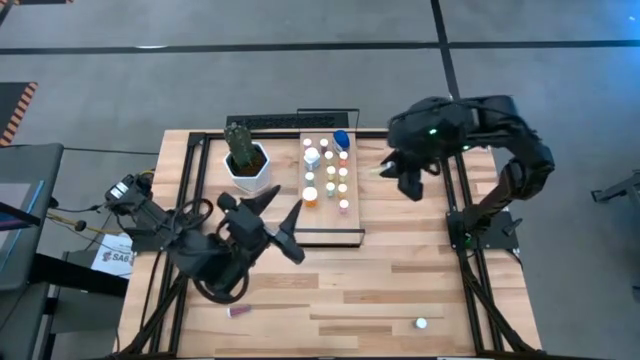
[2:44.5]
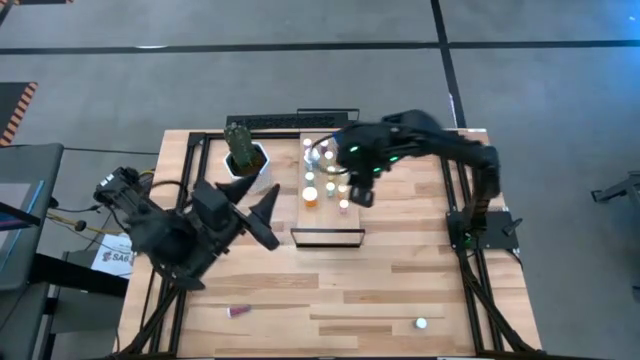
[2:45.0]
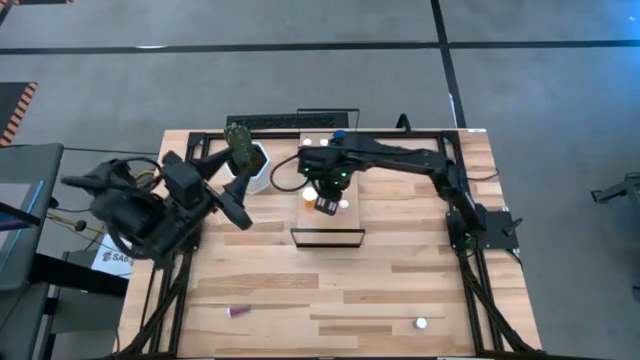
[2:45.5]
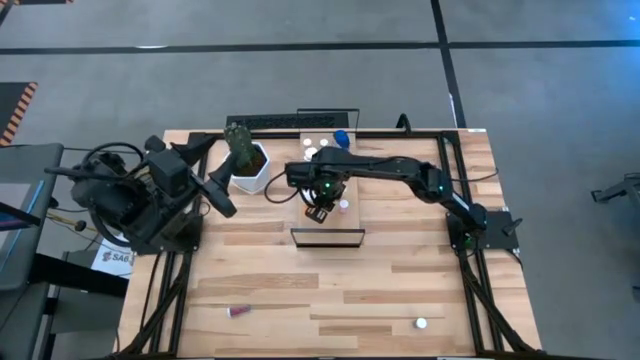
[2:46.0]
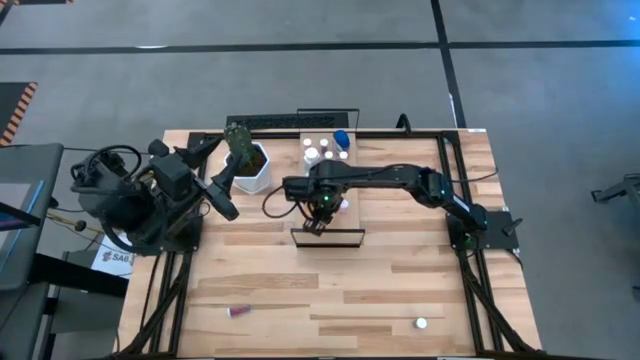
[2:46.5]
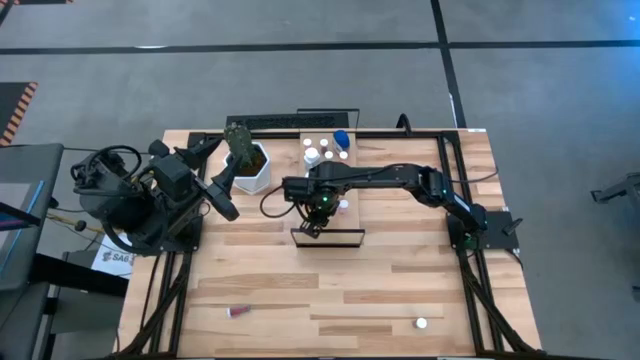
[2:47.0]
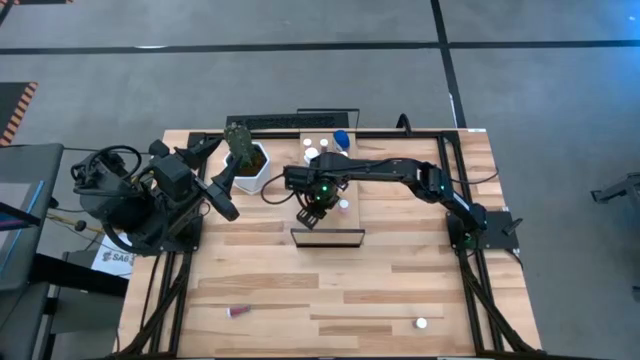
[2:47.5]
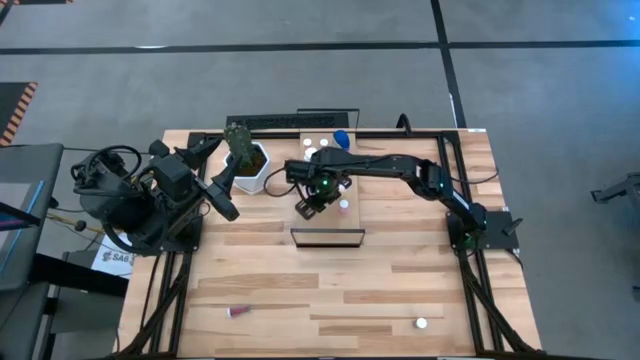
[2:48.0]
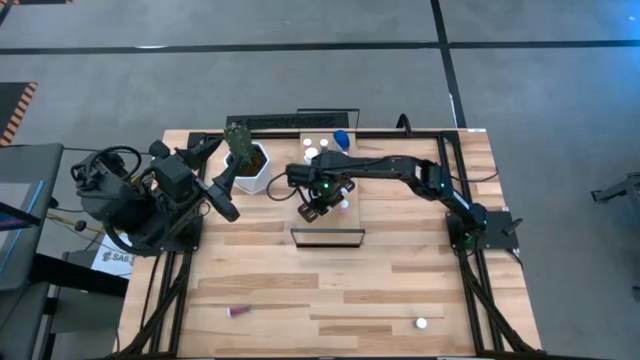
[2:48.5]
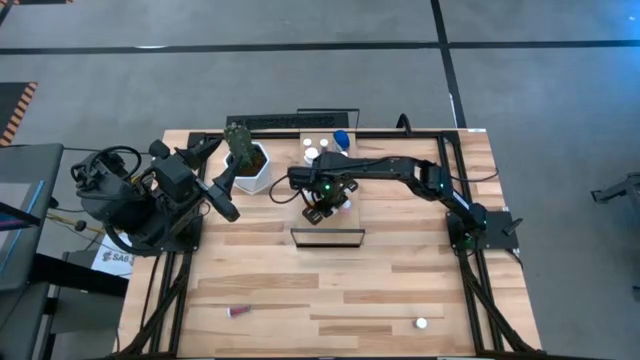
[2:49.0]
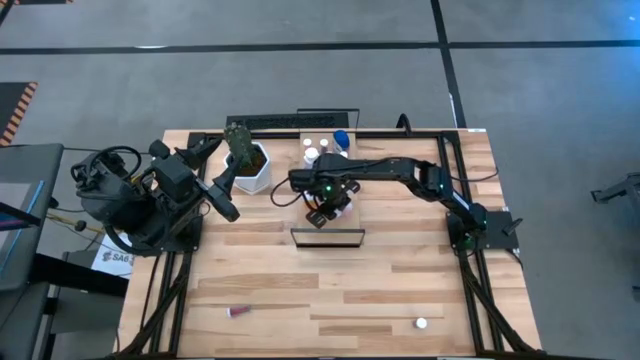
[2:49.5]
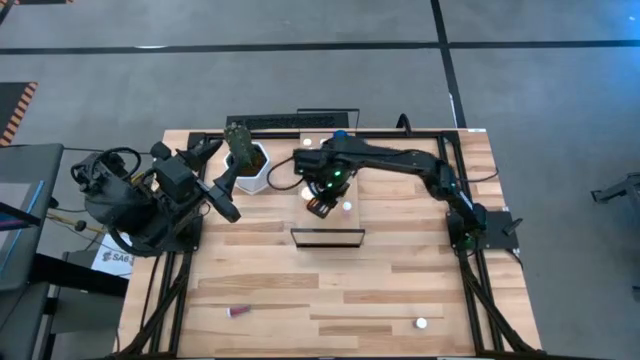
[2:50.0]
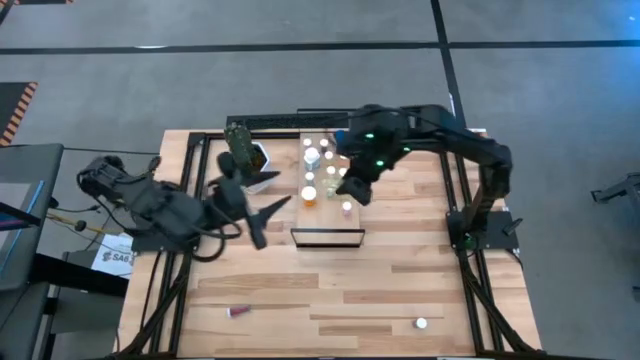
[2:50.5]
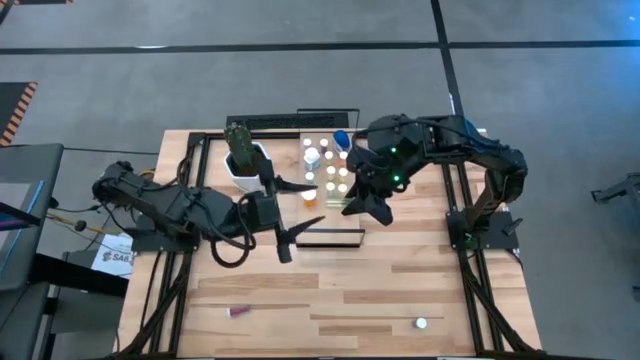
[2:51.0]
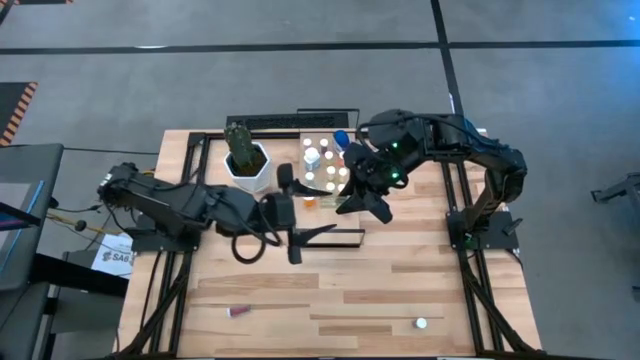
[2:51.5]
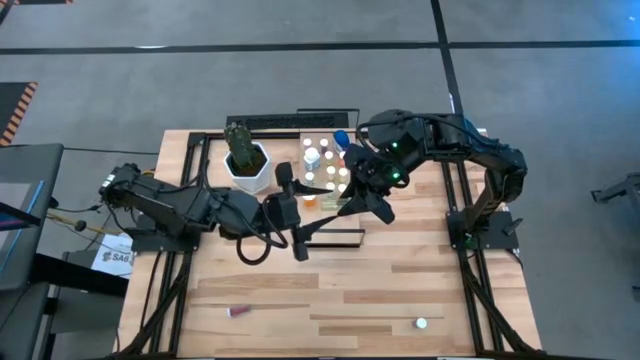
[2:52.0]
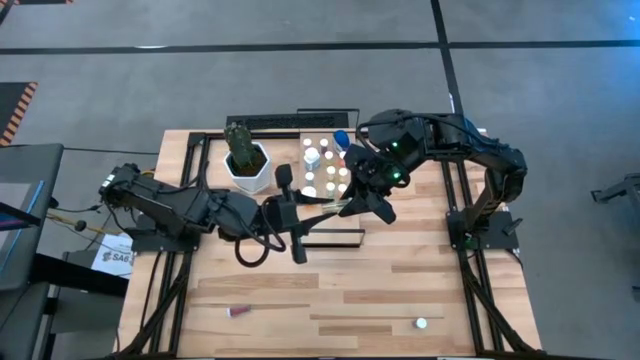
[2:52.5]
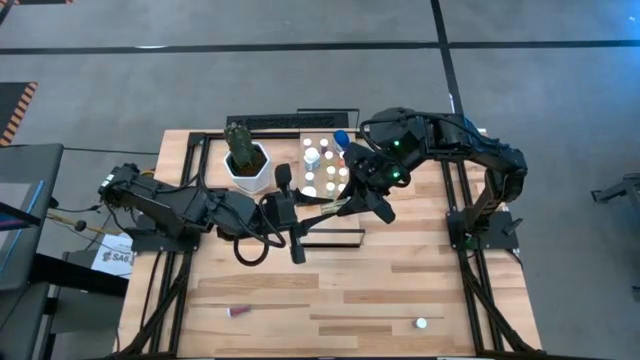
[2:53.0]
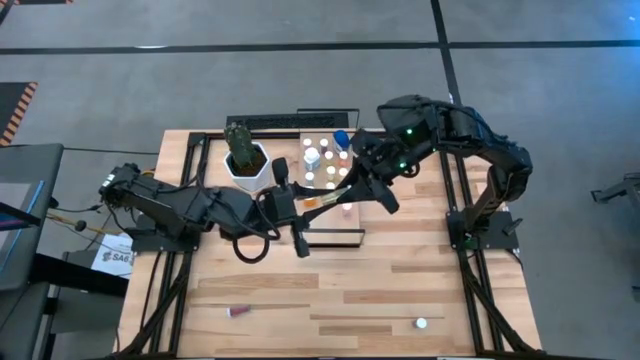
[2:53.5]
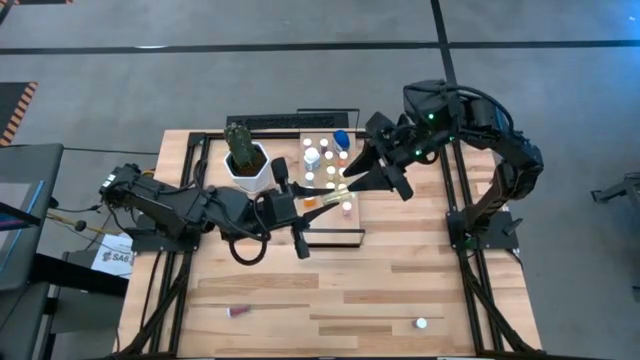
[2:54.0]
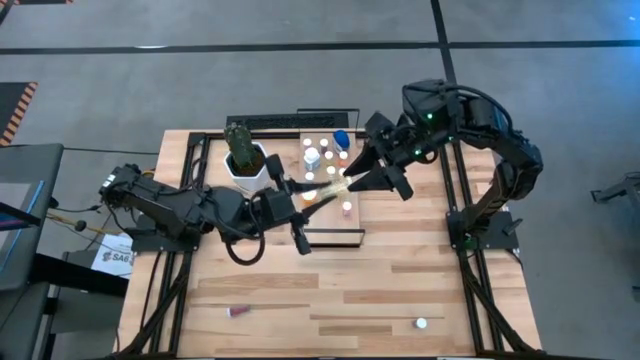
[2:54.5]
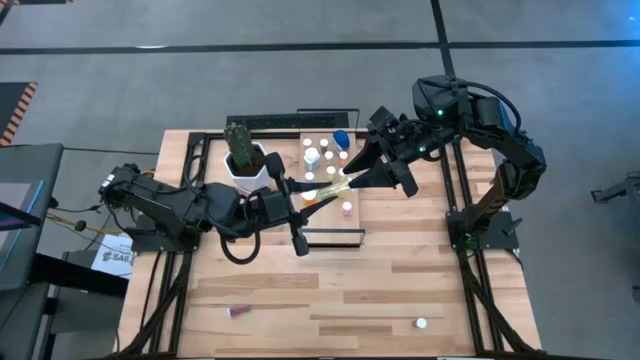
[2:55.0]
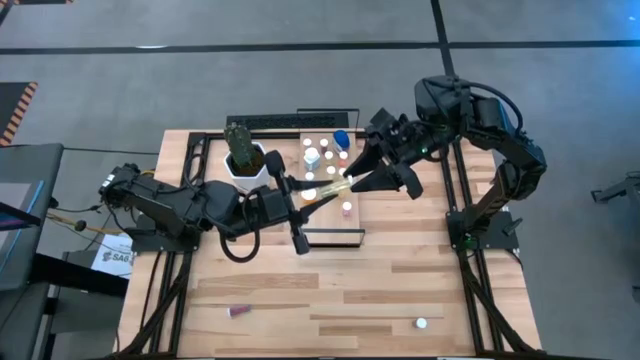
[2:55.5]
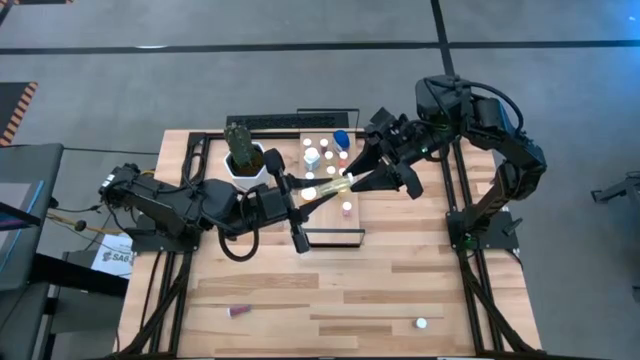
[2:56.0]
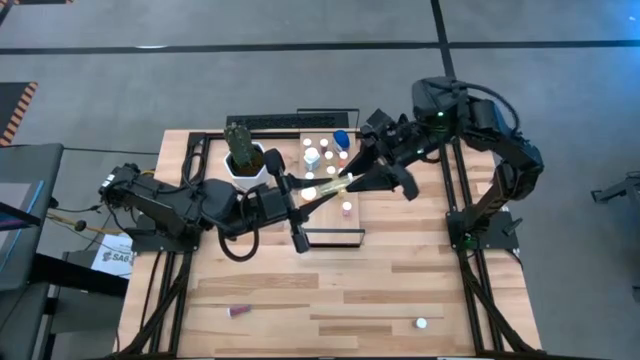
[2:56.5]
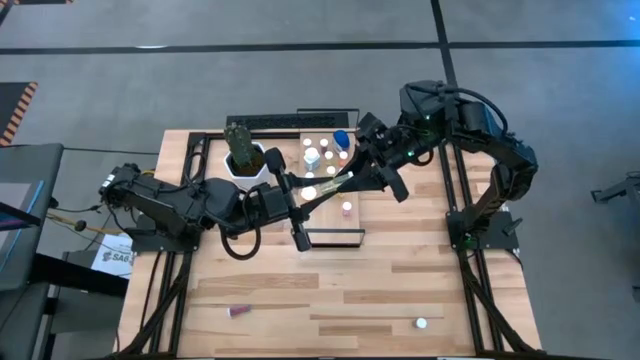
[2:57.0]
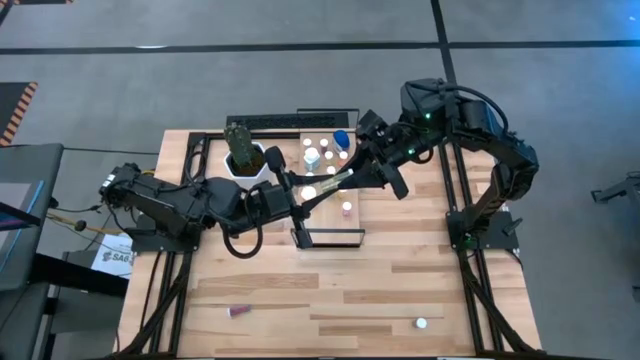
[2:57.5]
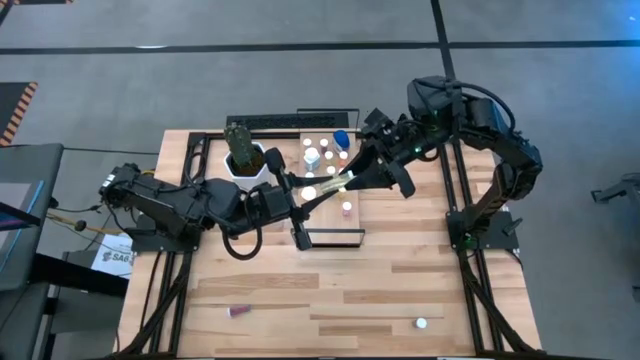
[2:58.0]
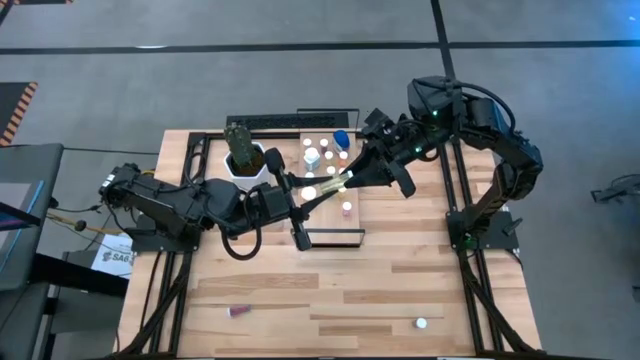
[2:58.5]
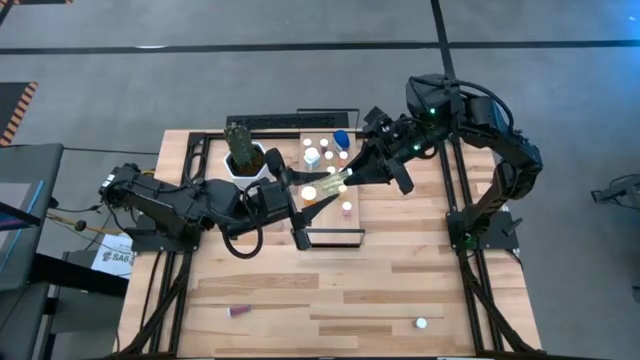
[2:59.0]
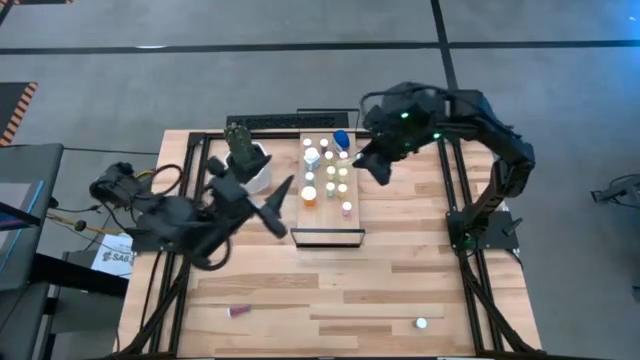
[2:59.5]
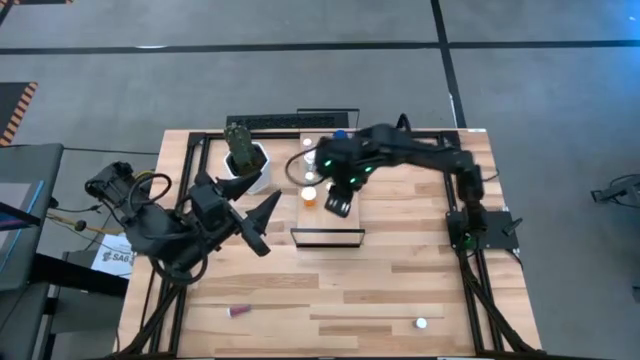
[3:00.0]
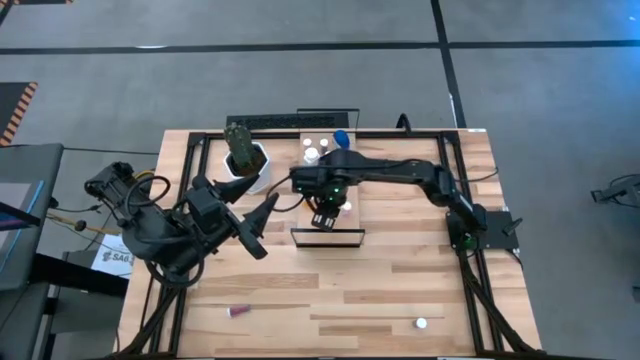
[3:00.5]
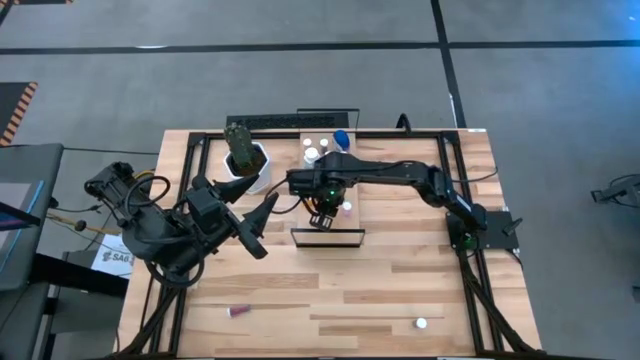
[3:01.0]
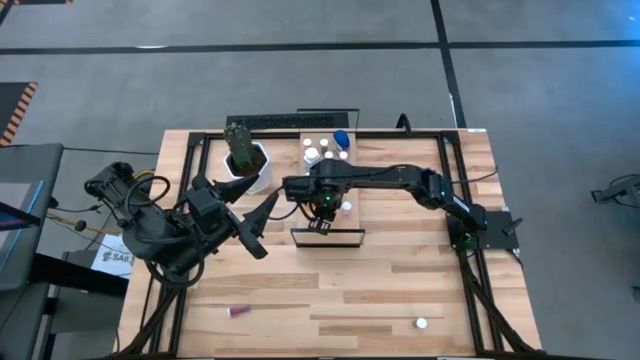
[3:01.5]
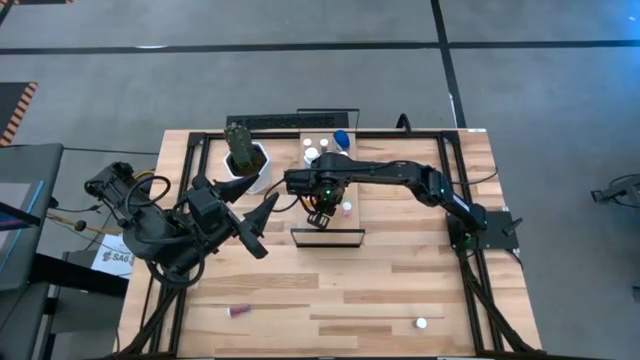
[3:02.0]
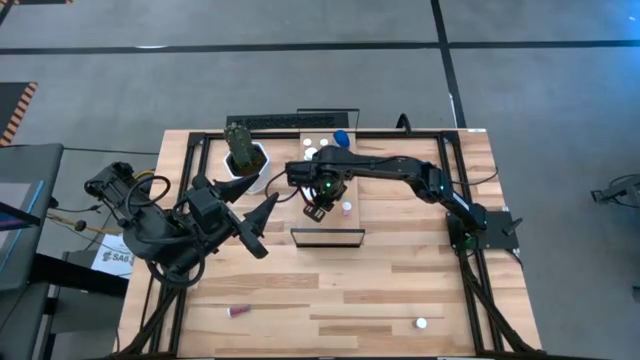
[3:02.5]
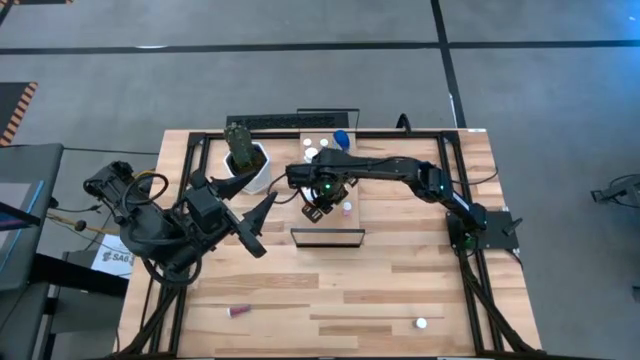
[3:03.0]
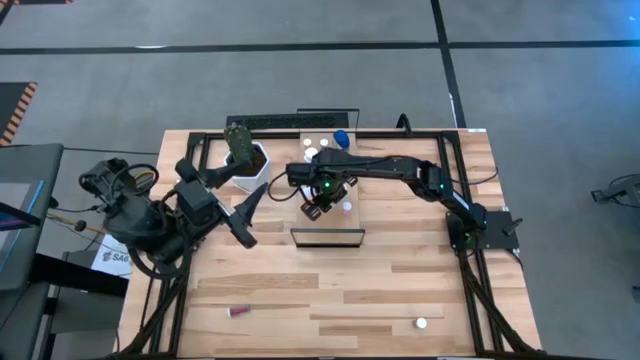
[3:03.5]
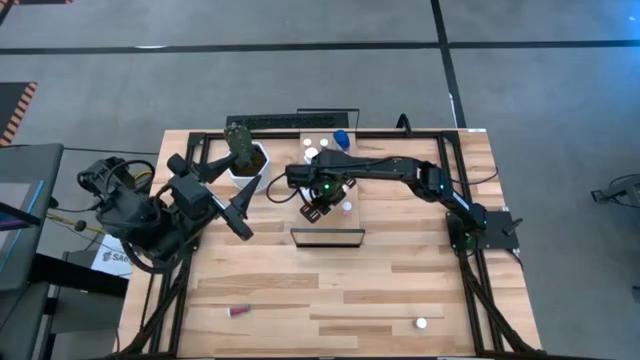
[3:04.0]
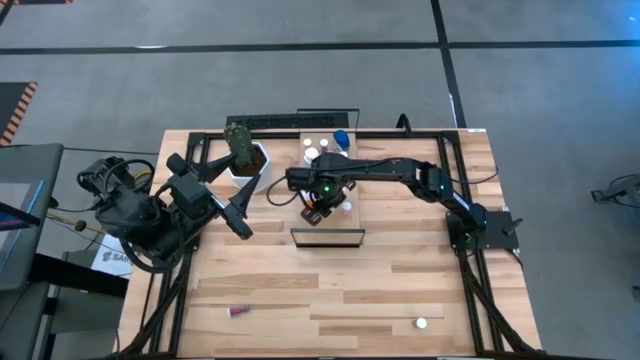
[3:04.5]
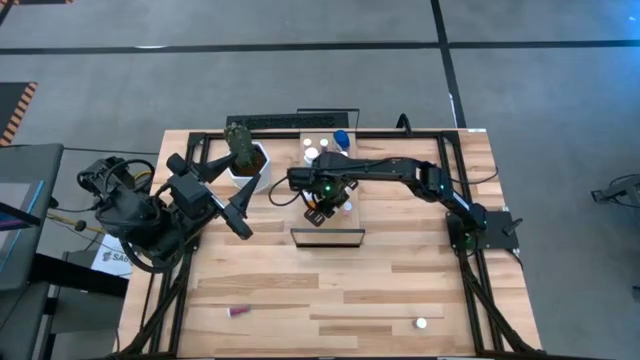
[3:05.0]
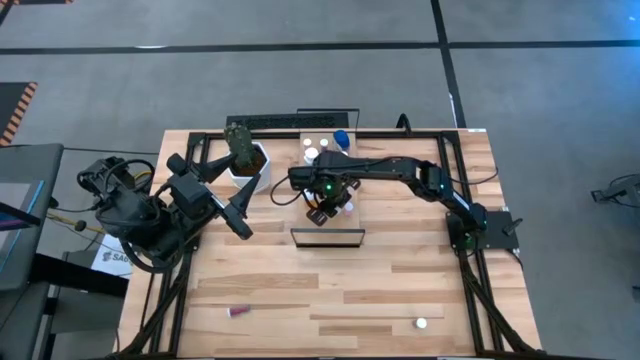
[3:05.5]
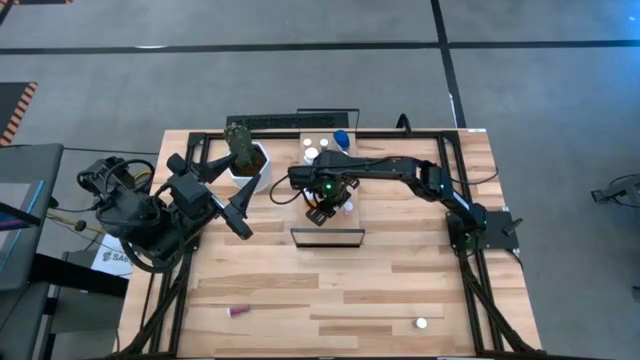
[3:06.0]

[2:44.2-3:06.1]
Task: Pick and place medicine bottles onto shelf by color
Put the yellow pill bottle on the shelf

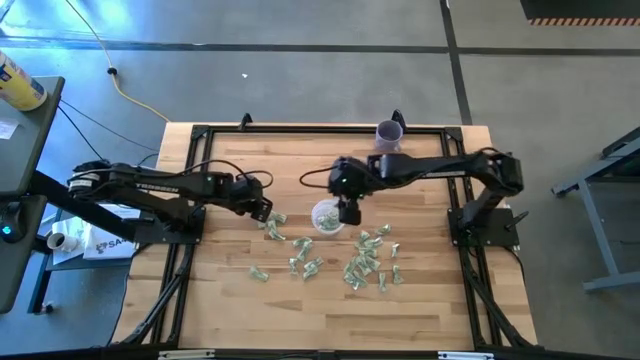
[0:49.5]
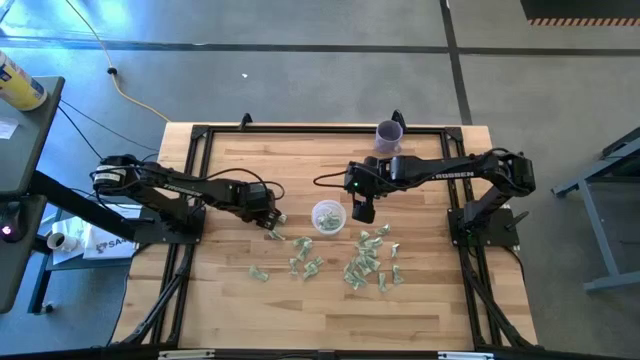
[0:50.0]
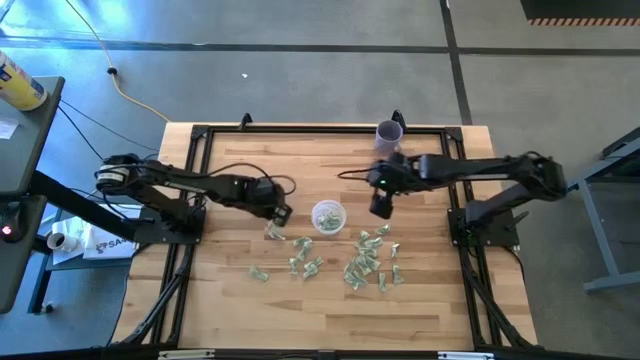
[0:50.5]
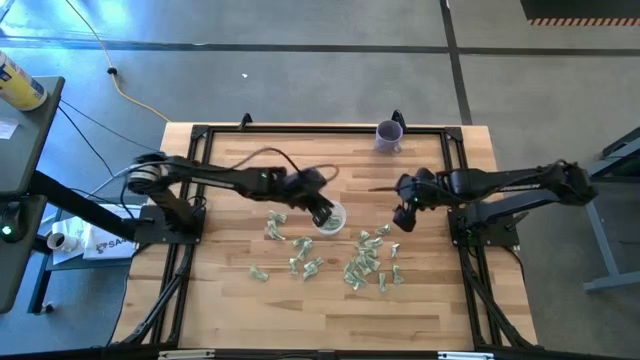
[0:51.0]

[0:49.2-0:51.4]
Task: Pick and place Stevia / Truvia into bins
Put the green stevia packet into the transparent bin
